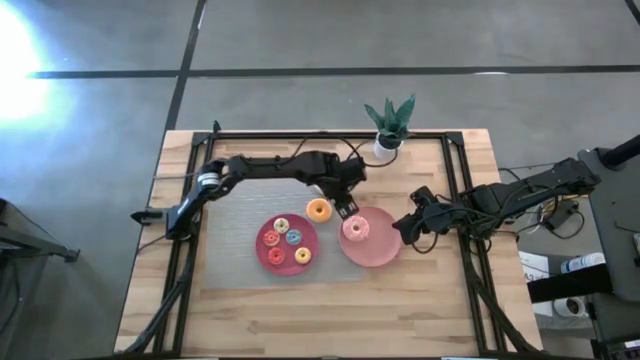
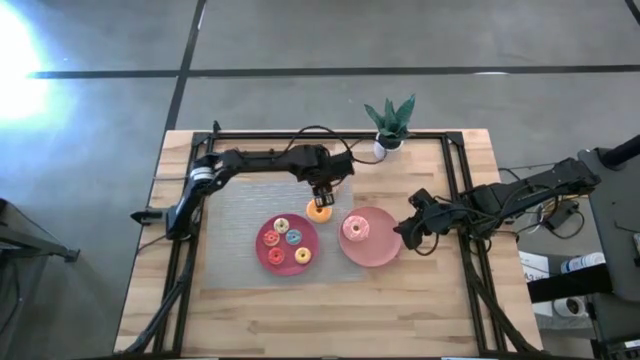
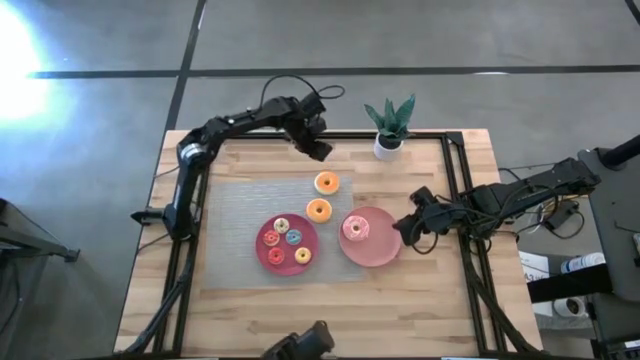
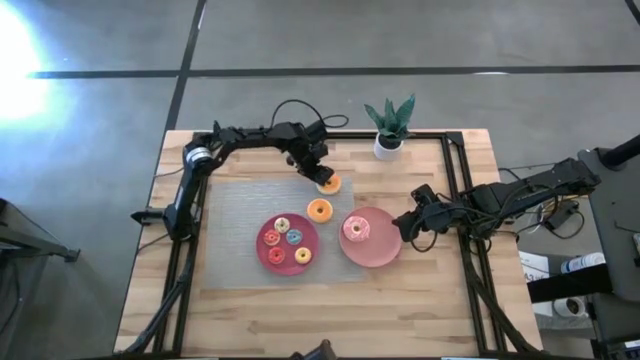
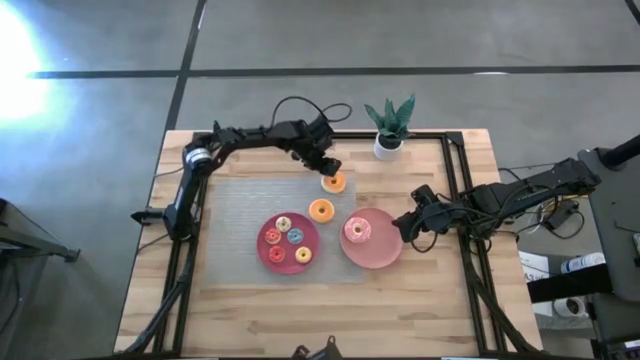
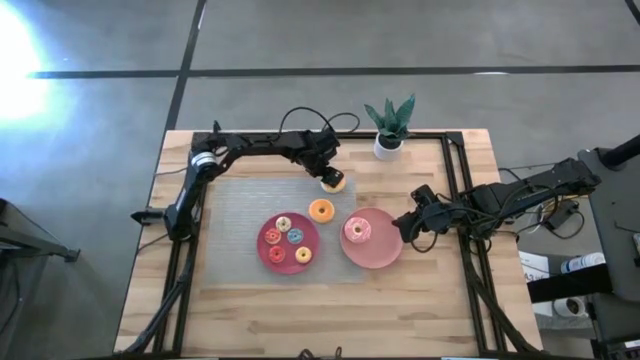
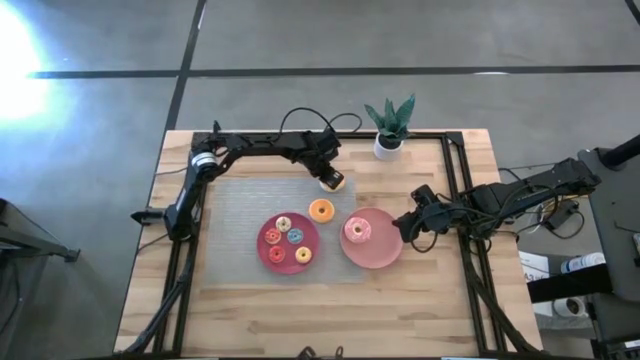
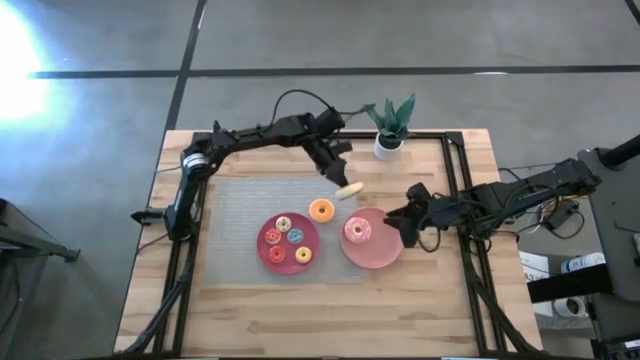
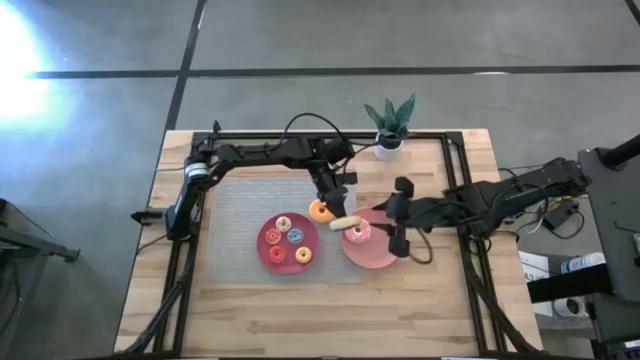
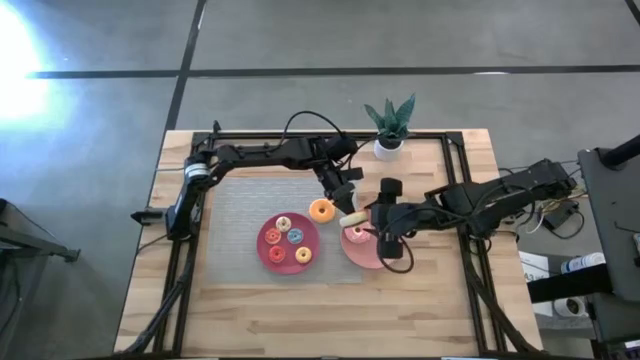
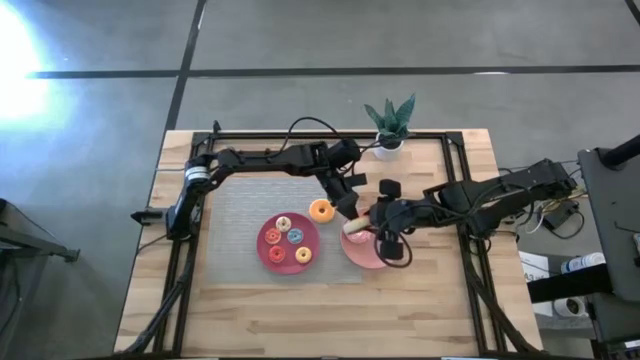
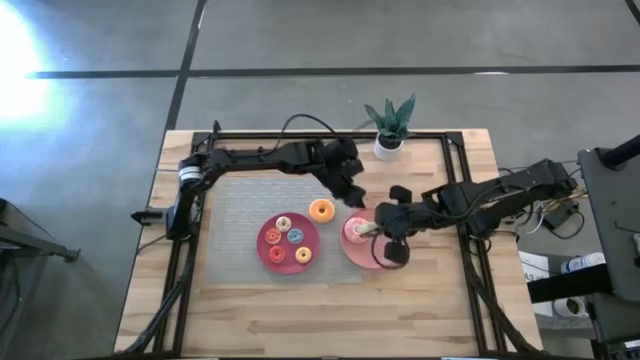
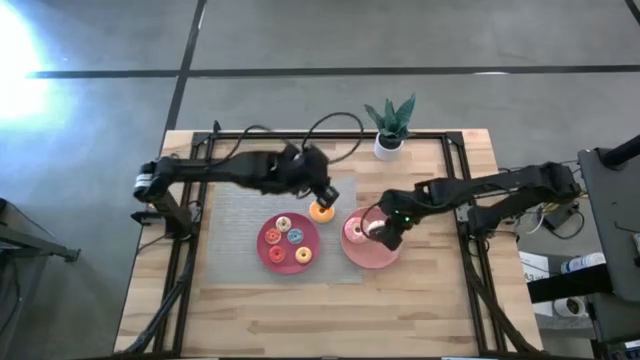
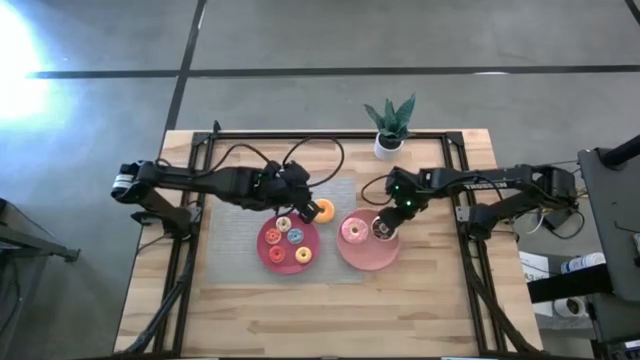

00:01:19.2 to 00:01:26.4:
Task: Pick & Place donuts
Put the large dark brown donut on the pink plate

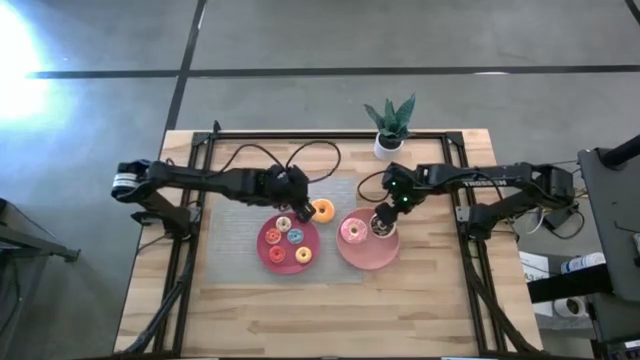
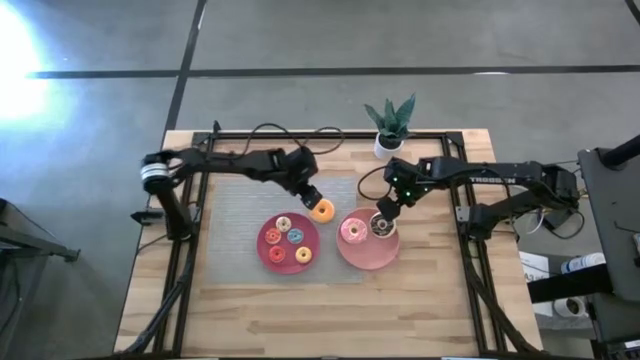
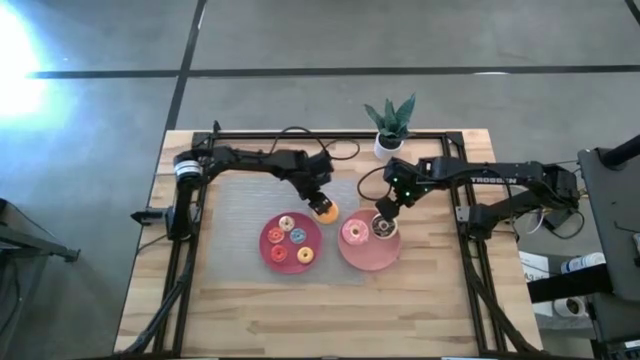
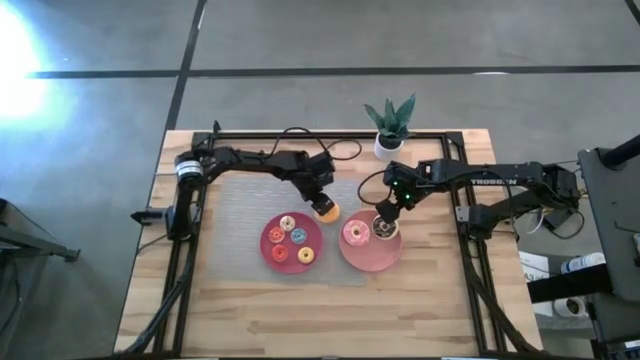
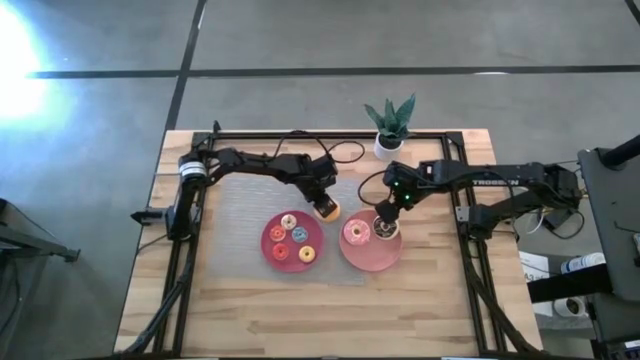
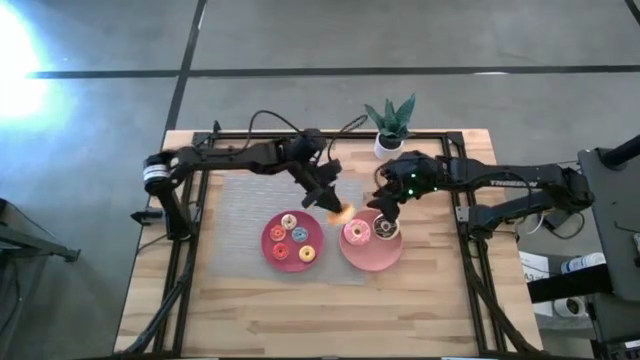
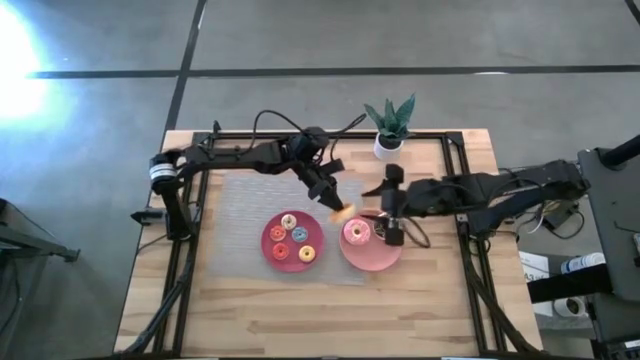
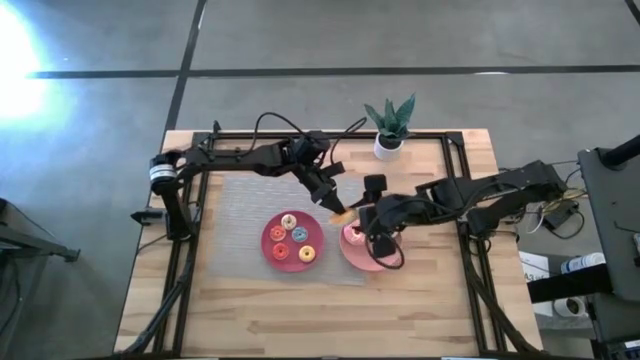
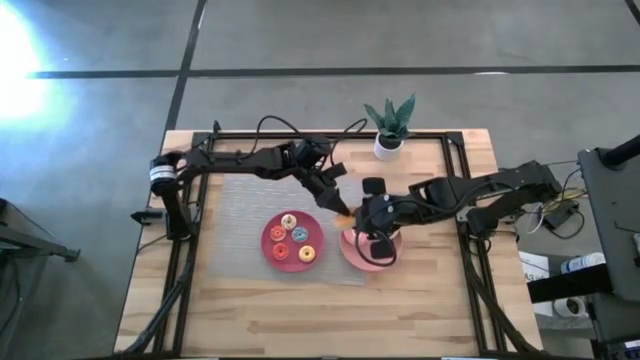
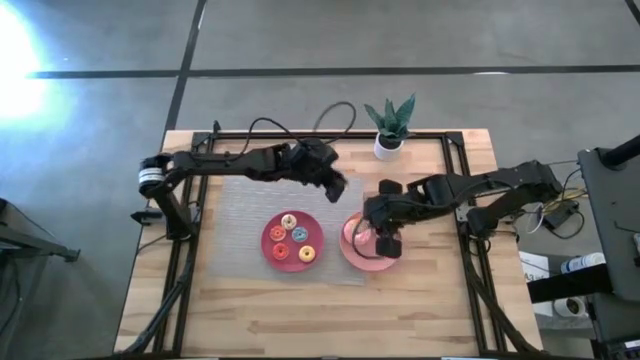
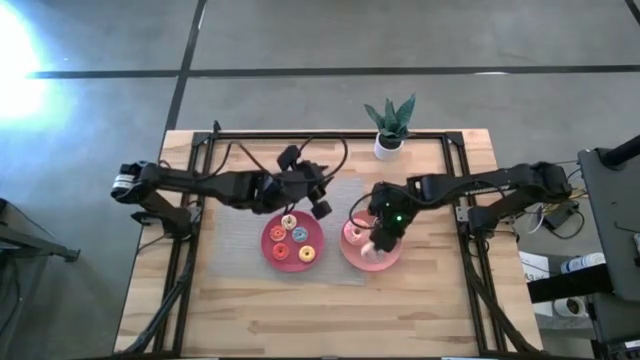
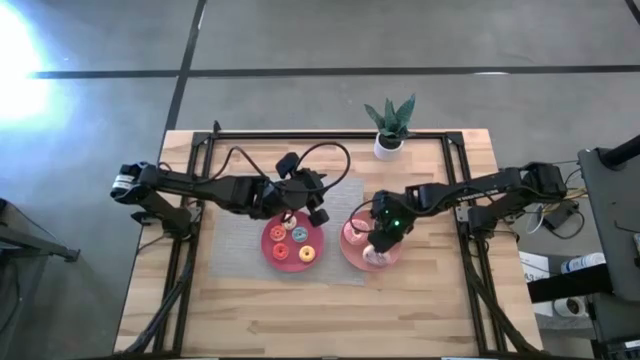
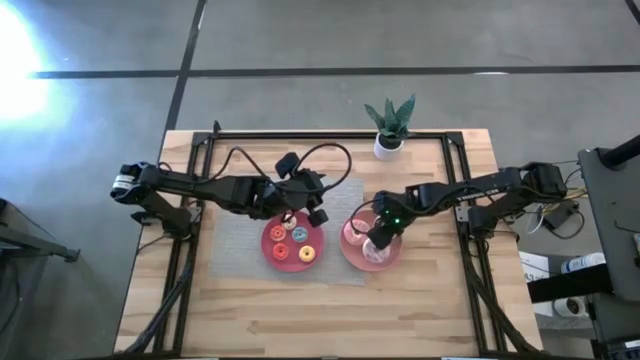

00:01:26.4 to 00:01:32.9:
Put the large purple donut on the pink plate

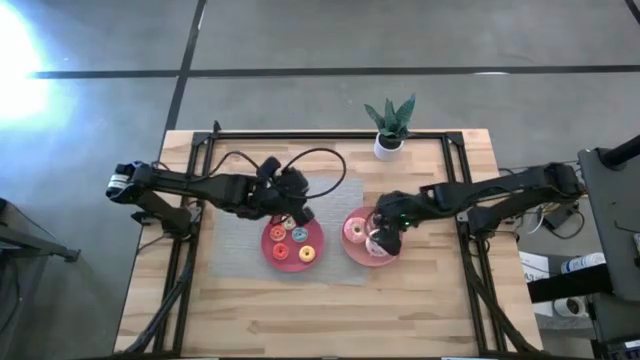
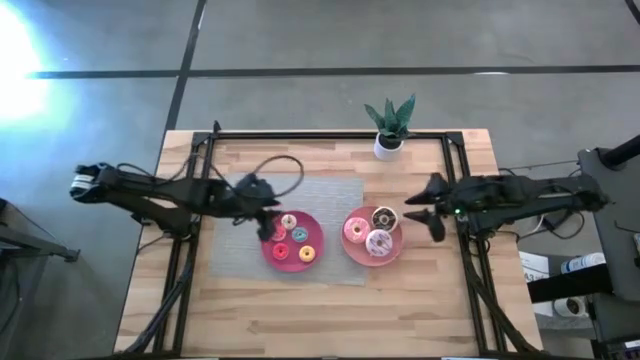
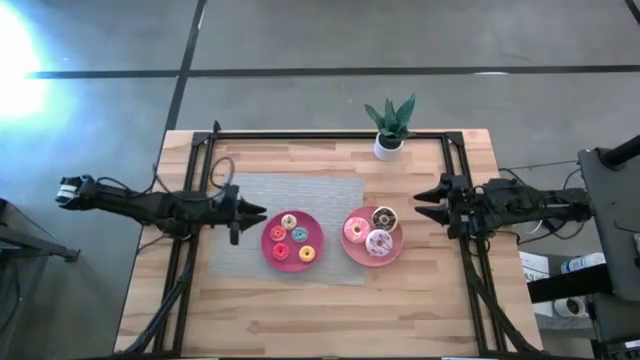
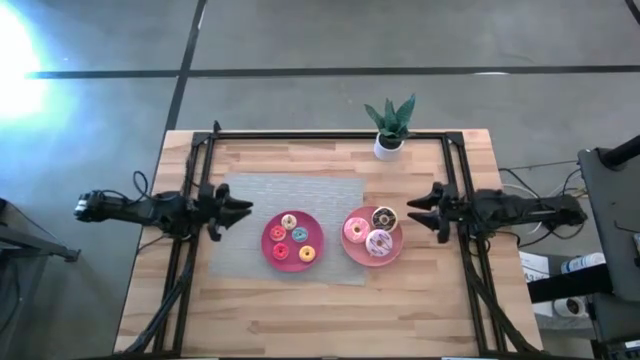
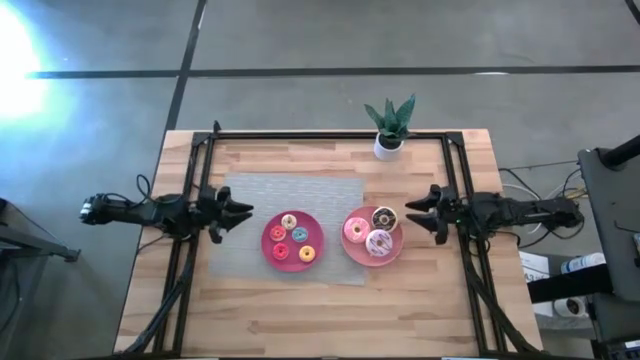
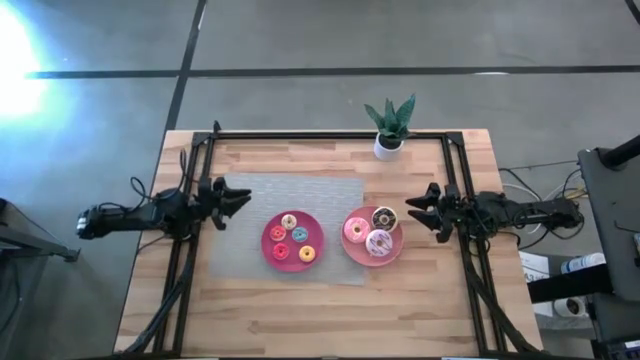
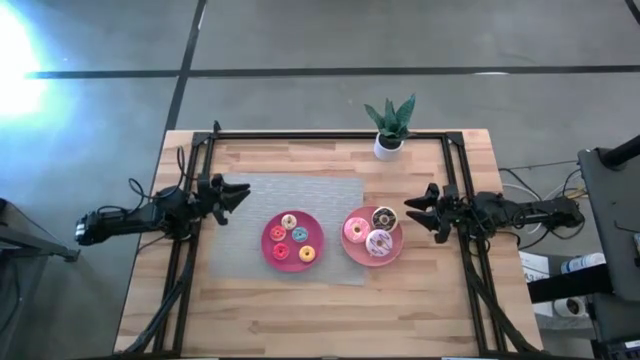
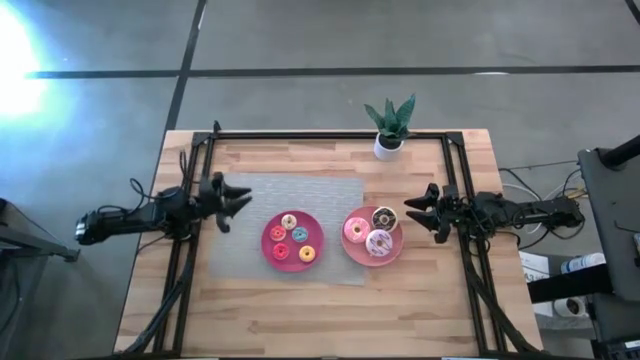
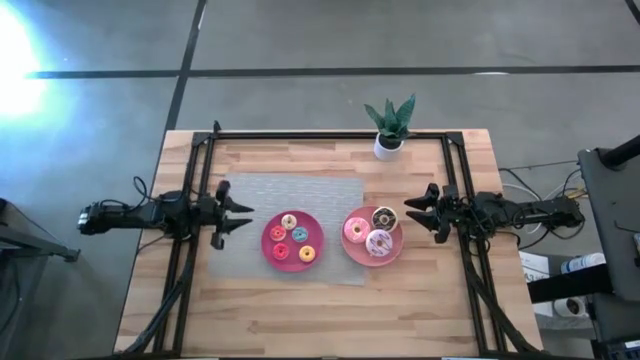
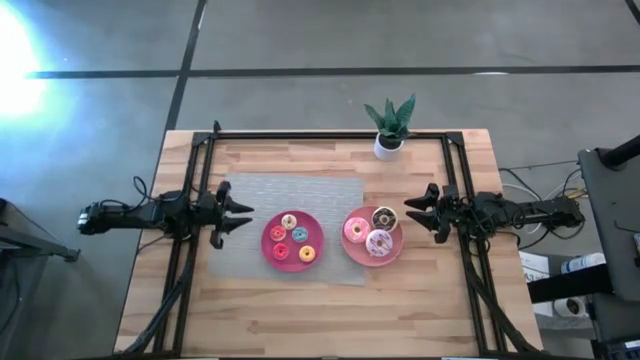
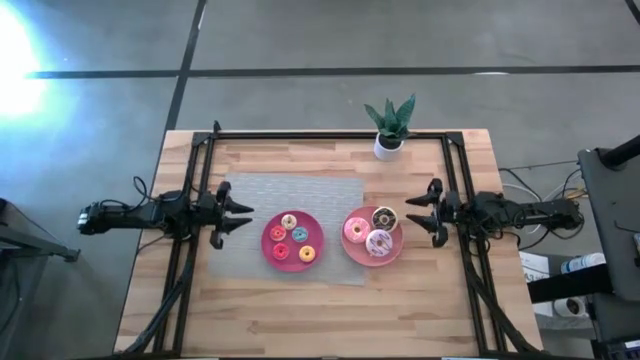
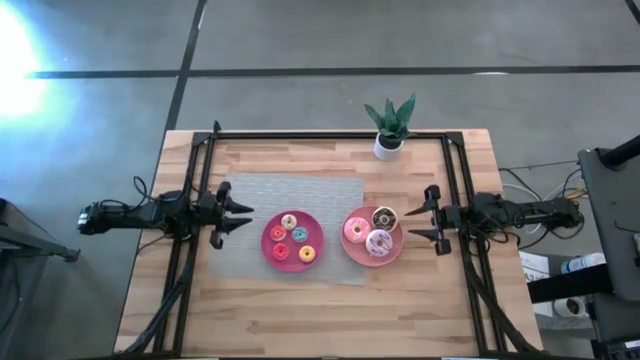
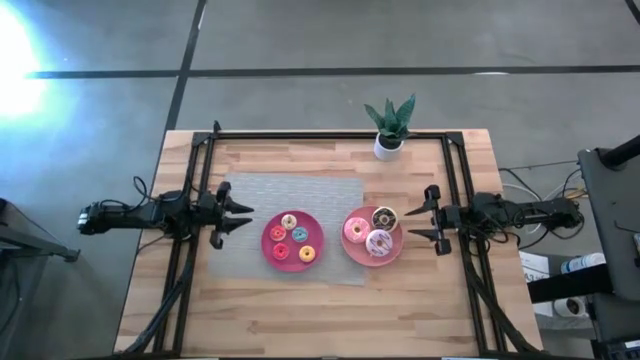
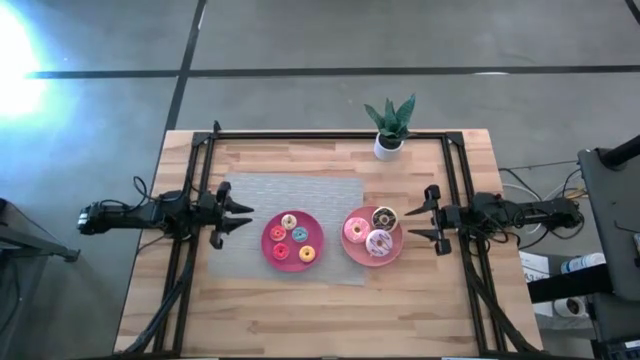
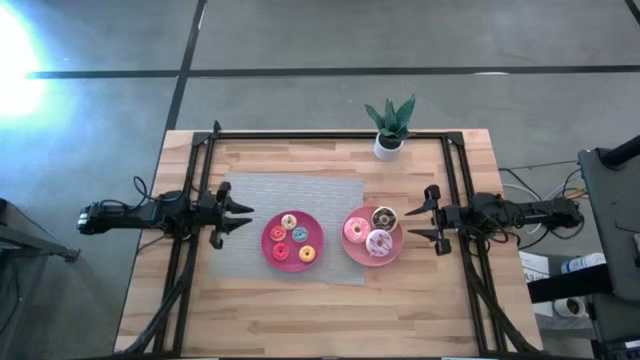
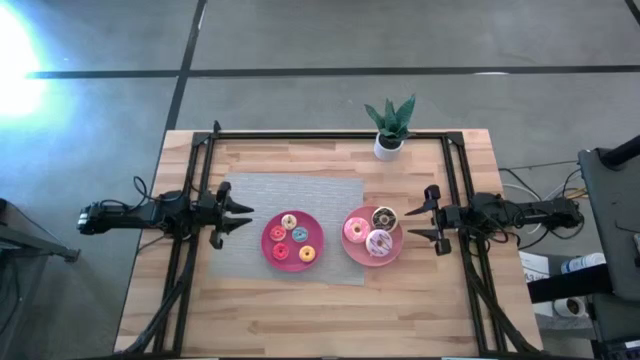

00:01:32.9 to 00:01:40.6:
Return to Home Position

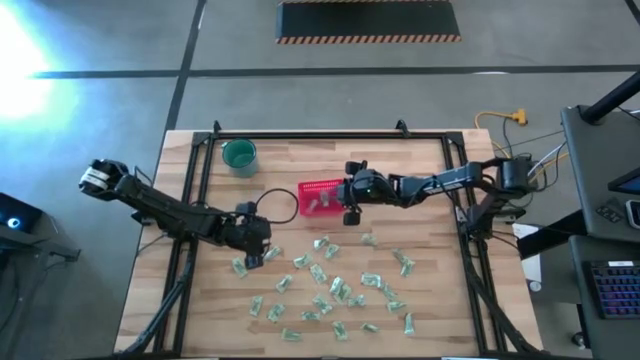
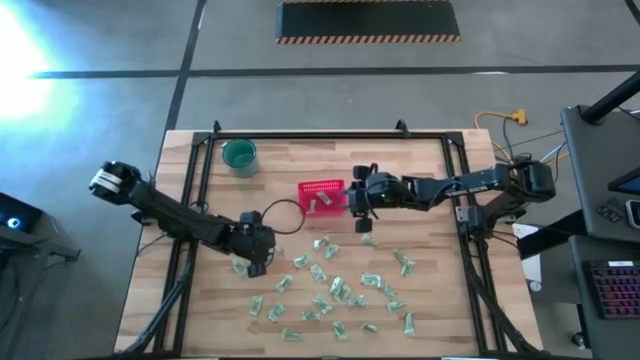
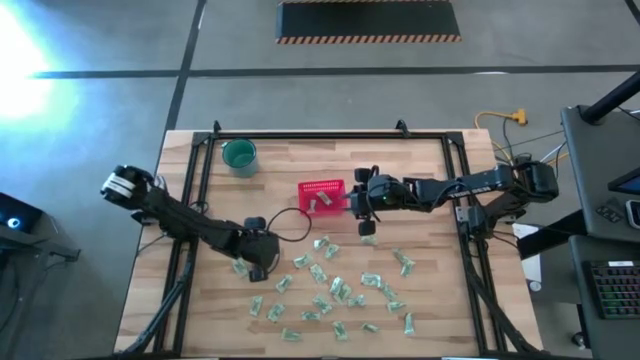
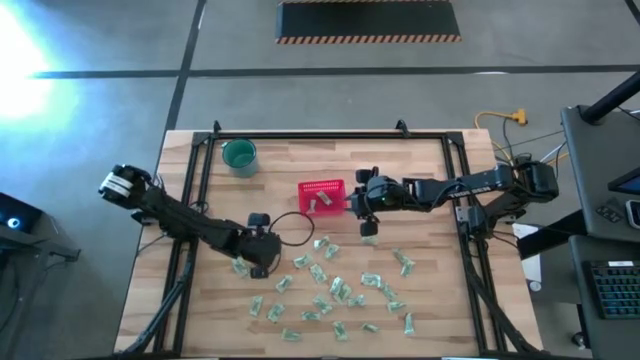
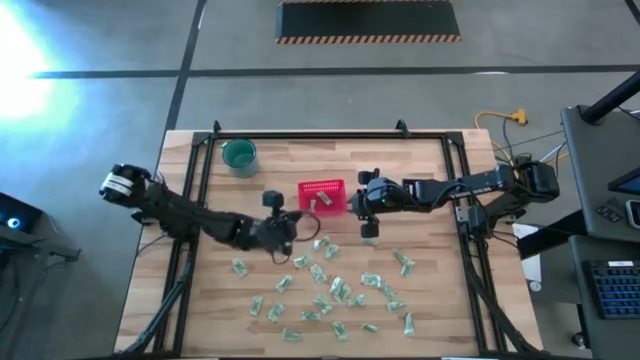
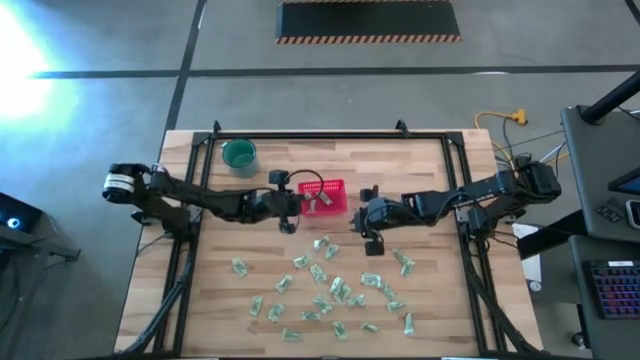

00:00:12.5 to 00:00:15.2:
Task: Pick and place items into bin
Put the stevia packet into the red bin
